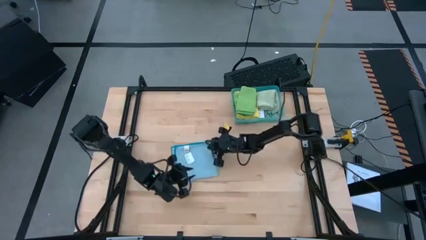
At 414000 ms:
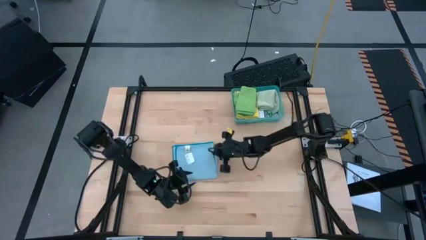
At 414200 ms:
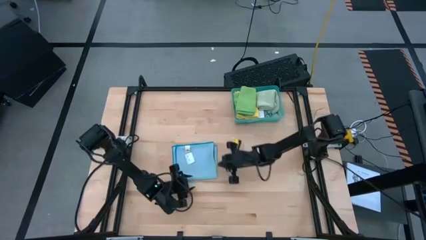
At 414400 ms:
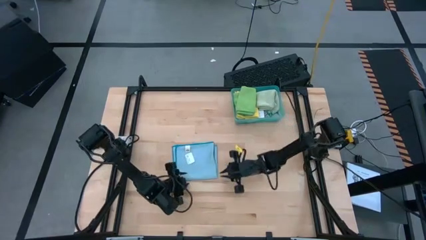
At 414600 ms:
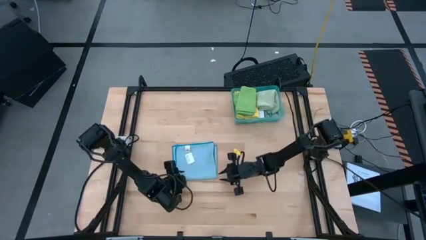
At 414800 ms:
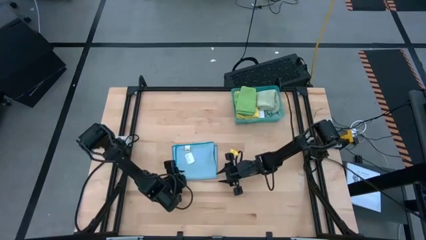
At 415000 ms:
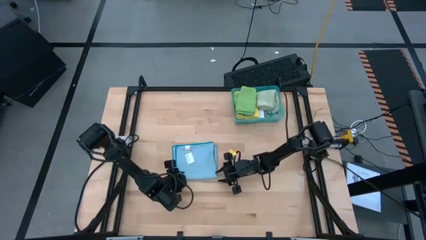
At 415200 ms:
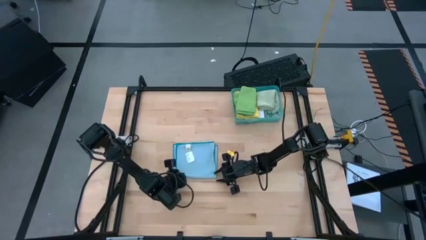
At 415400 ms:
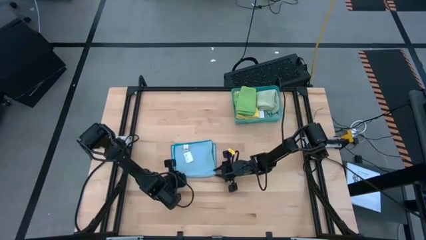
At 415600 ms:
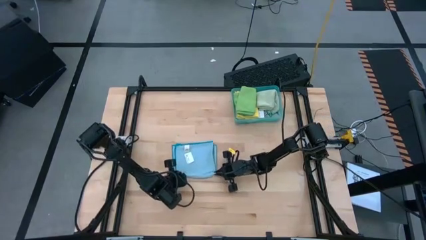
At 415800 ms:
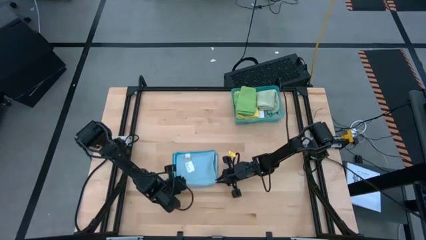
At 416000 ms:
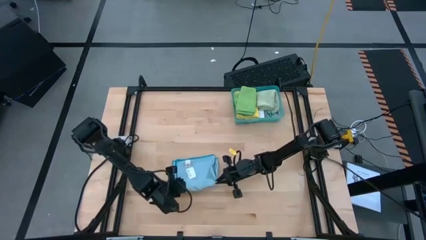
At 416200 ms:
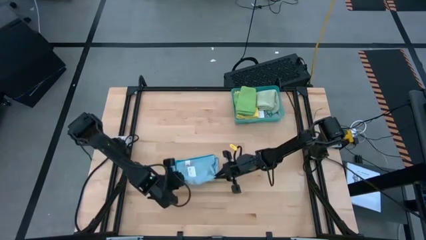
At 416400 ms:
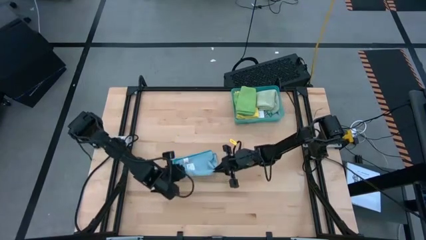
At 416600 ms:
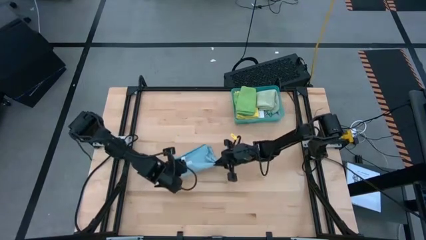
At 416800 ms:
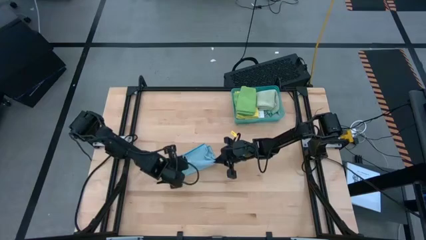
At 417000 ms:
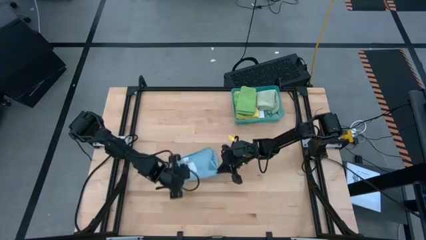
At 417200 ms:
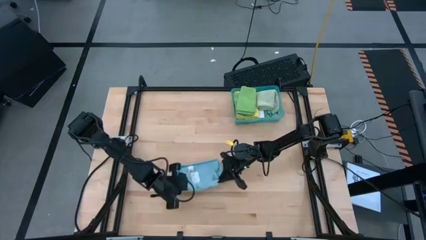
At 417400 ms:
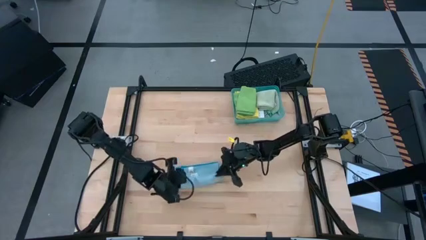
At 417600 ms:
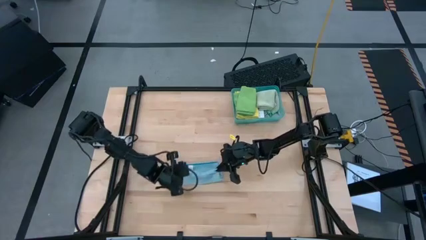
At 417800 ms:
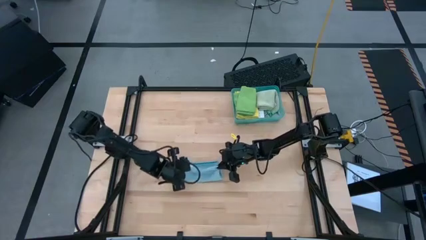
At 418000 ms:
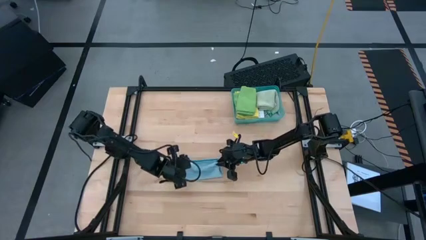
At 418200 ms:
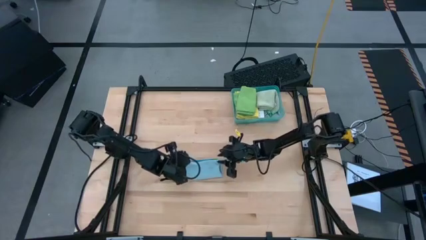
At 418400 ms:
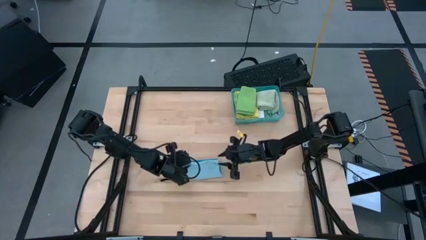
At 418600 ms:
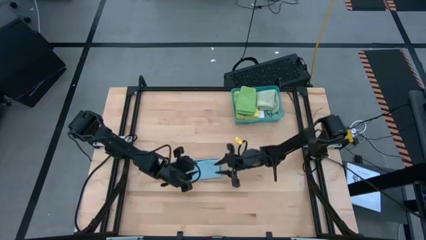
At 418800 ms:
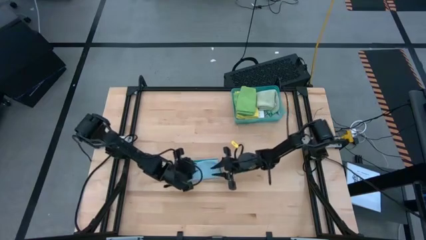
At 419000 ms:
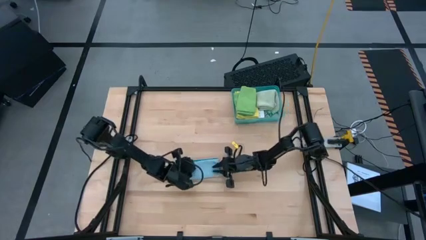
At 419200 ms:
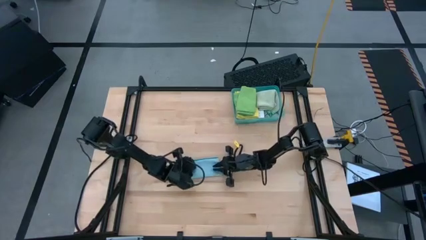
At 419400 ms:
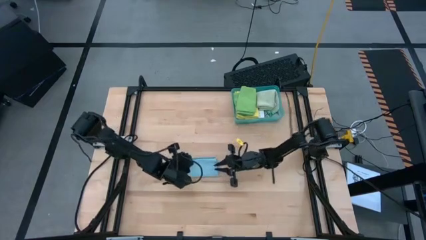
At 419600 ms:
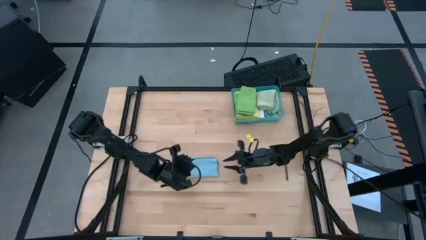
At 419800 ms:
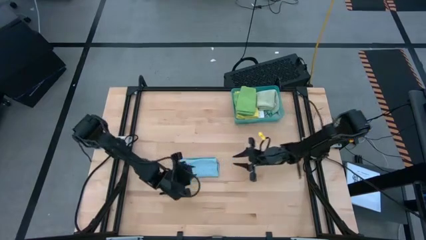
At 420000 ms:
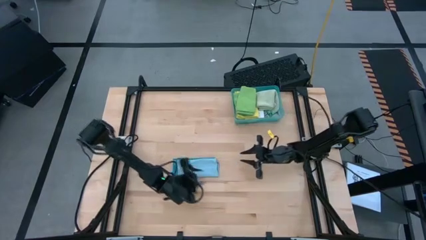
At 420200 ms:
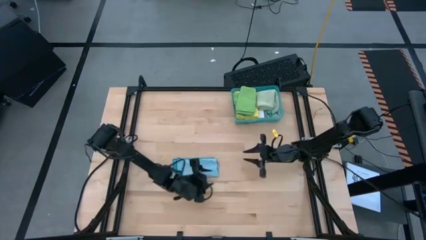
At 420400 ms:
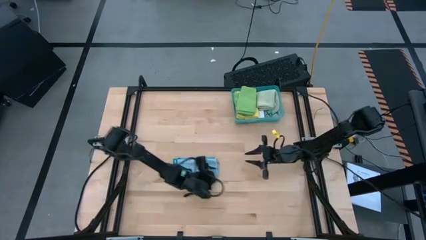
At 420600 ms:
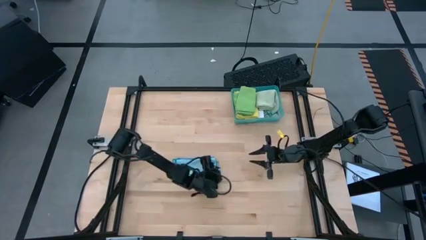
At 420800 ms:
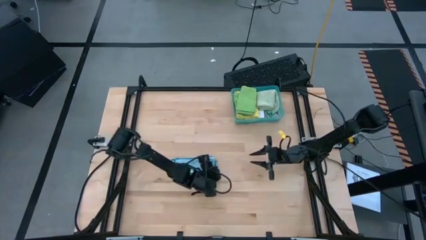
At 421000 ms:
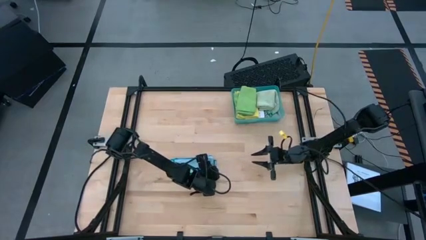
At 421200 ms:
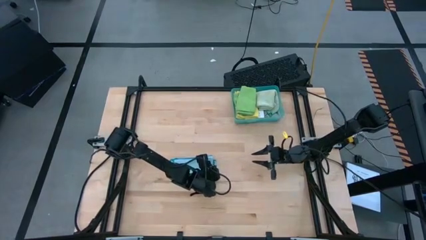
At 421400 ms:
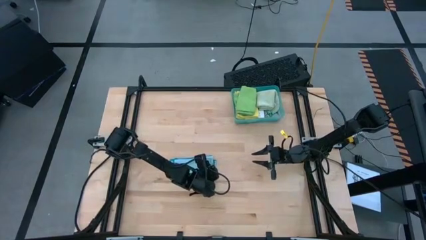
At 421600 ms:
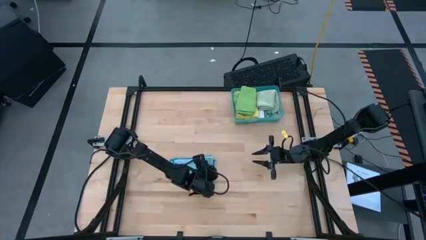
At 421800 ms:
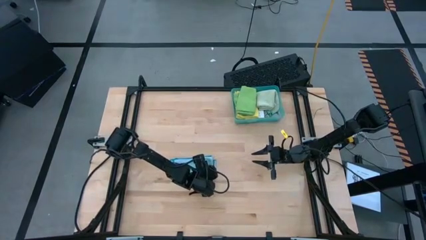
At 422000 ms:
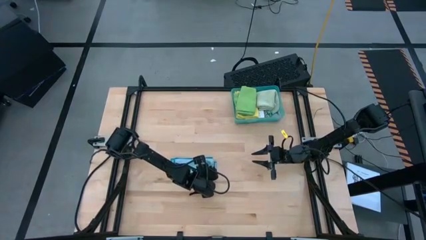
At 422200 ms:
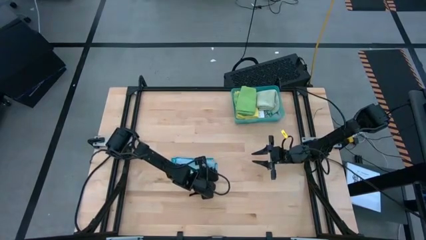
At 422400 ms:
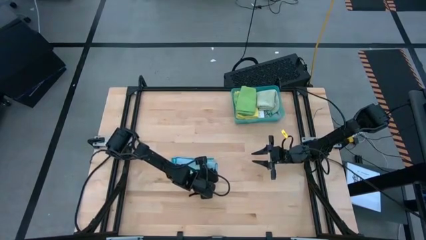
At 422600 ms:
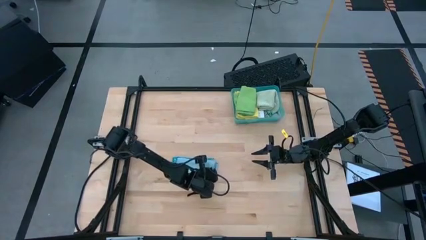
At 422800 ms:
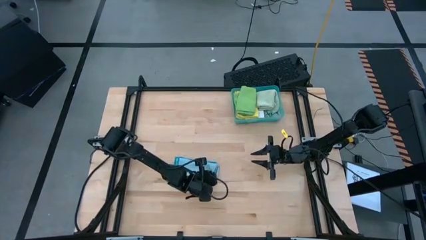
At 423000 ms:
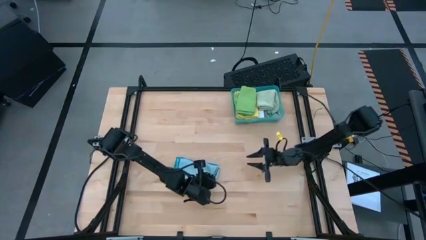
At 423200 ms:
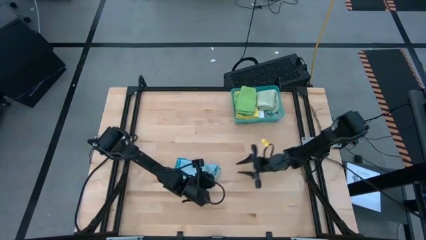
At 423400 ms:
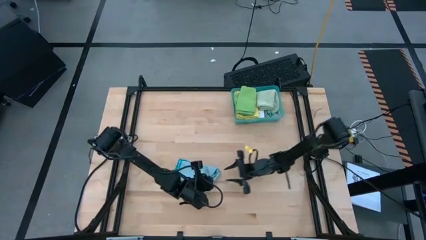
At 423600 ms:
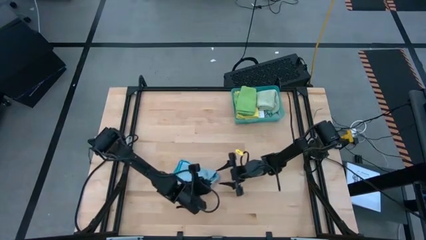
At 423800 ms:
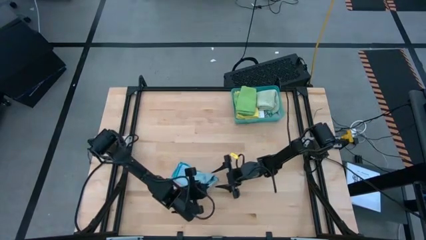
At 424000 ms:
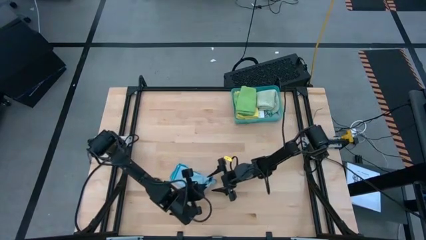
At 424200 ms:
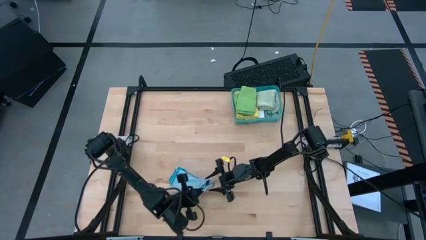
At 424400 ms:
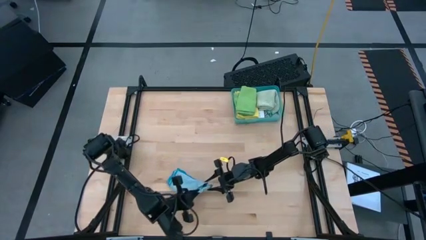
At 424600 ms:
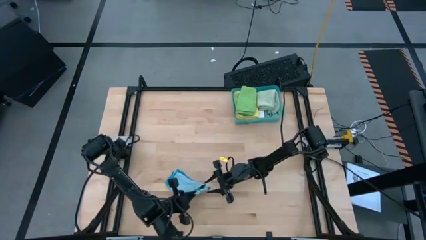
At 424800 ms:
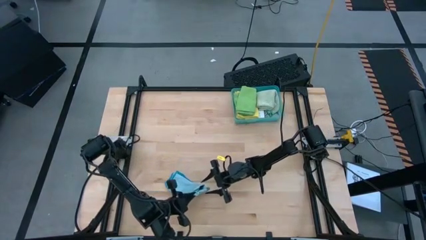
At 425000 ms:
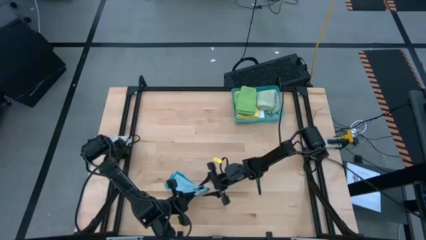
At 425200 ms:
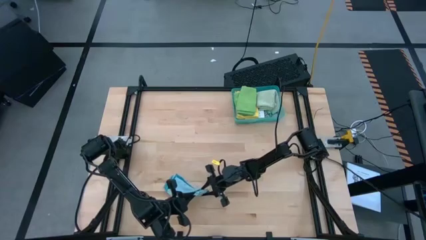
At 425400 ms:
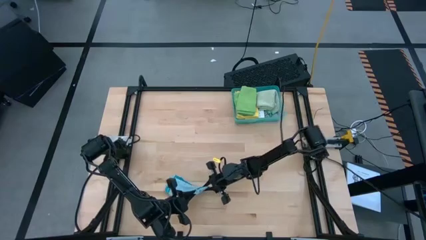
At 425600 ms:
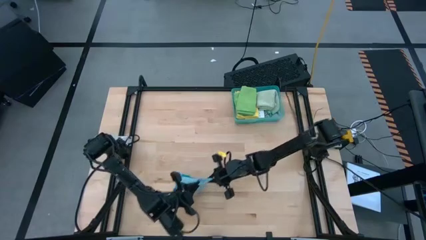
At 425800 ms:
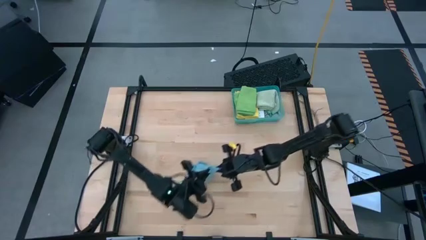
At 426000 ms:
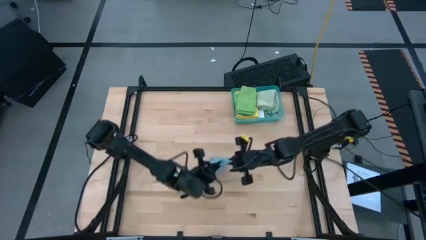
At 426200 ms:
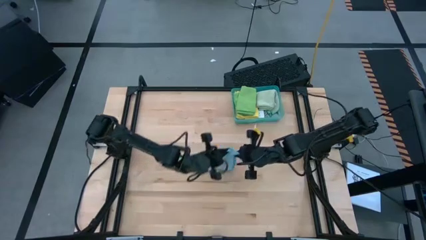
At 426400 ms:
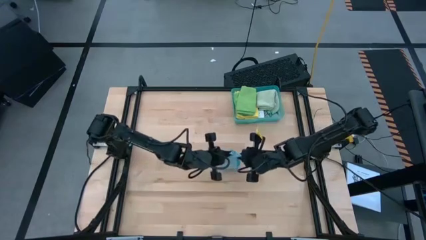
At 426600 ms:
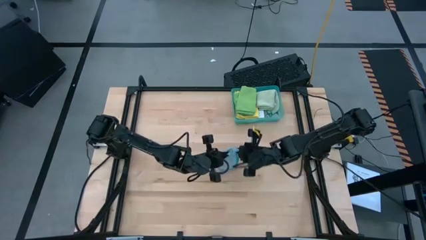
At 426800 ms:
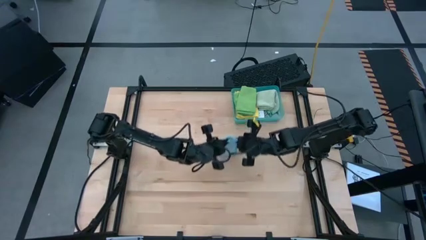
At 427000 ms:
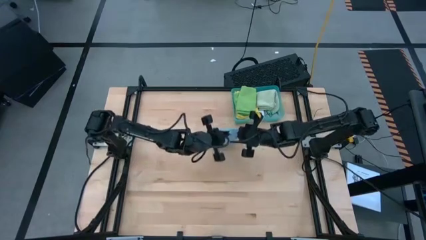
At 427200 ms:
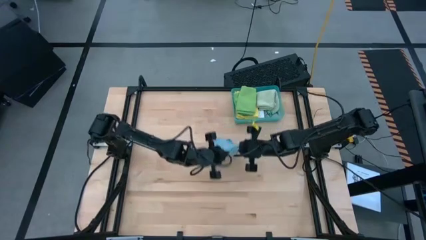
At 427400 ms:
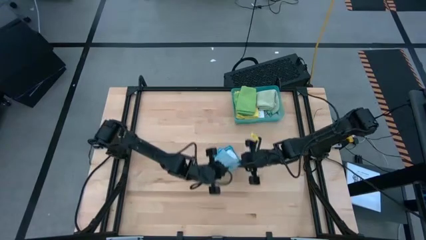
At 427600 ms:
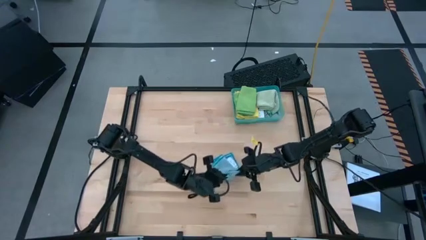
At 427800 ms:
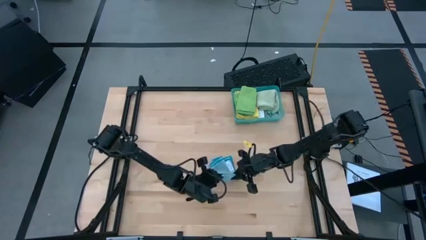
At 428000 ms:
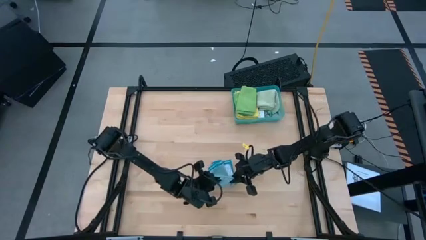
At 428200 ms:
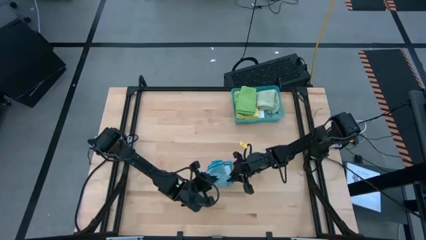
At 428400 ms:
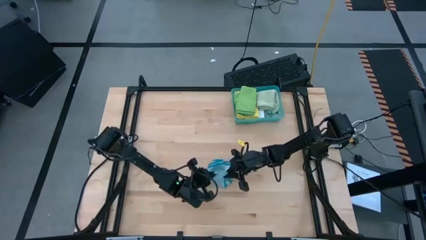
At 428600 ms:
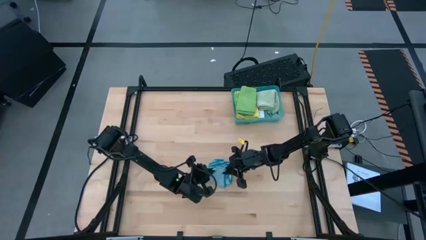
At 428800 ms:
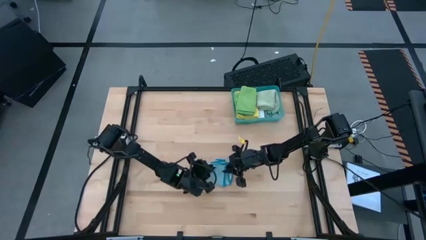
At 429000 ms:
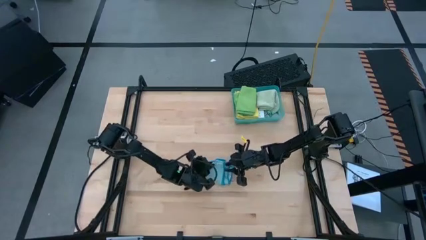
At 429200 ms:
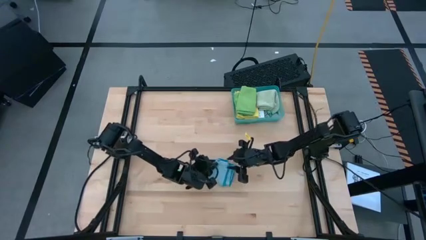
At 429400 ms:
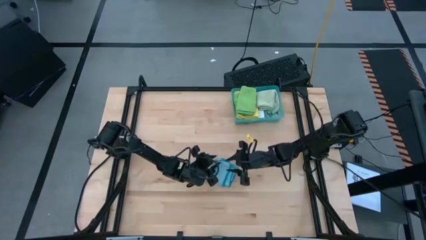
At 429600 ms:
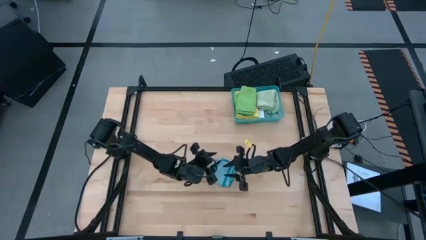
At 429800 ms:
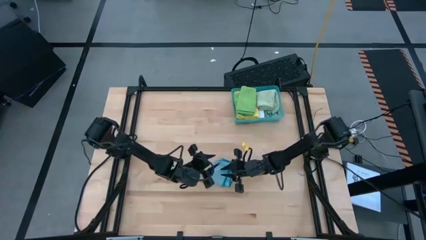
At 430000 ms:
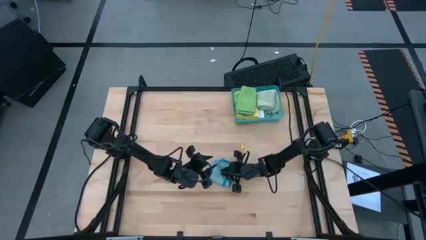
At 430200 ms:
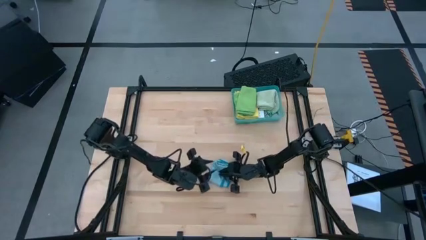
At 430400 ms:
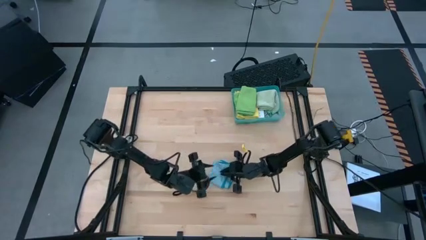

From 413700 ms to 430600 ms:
Task: Fold microfiber towels
Fold the blue microfiber cloth
